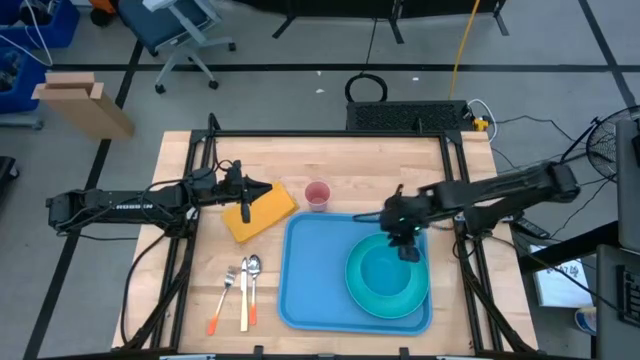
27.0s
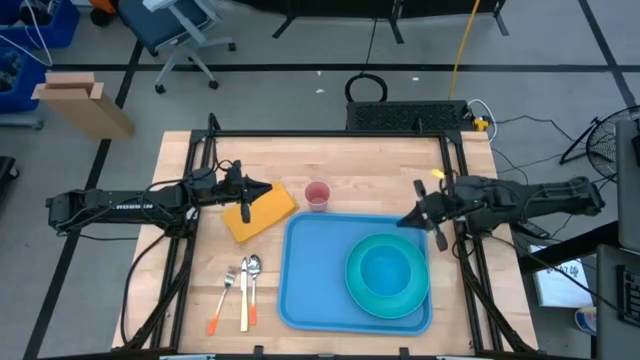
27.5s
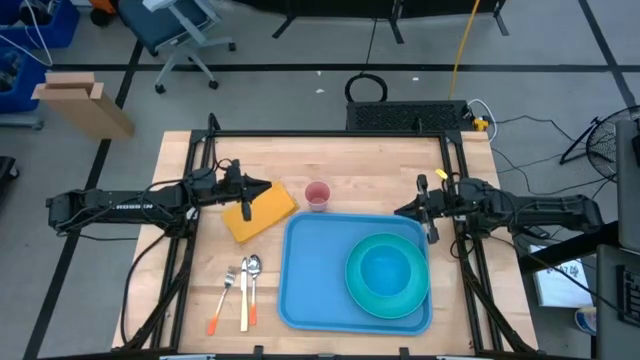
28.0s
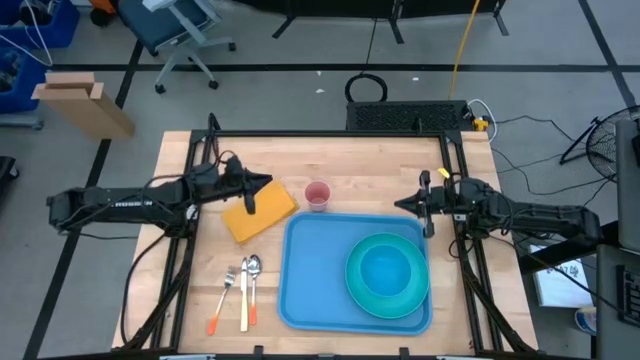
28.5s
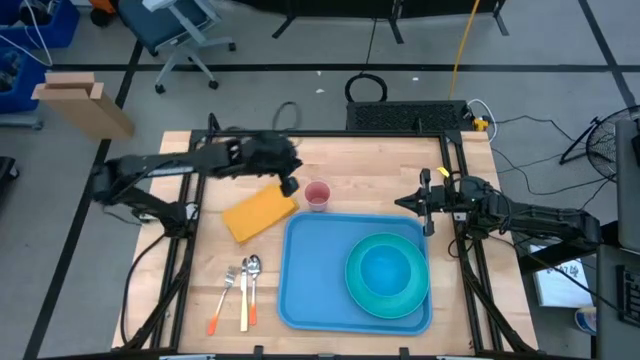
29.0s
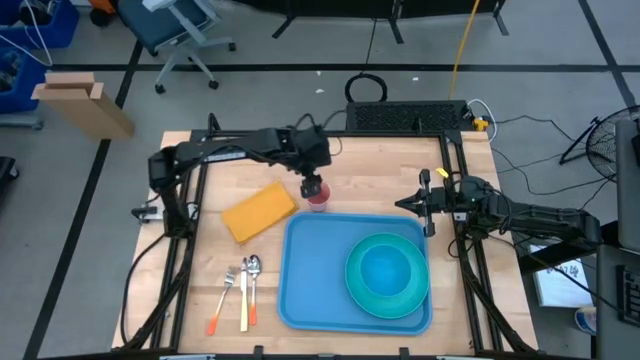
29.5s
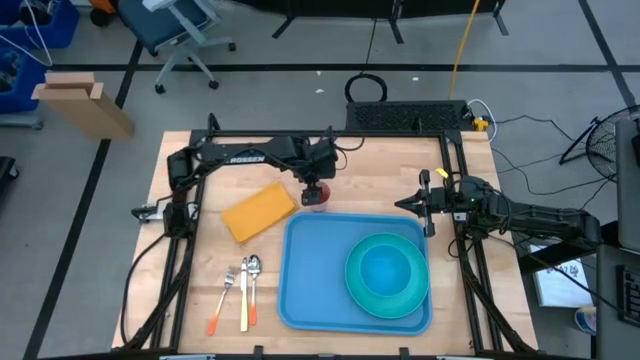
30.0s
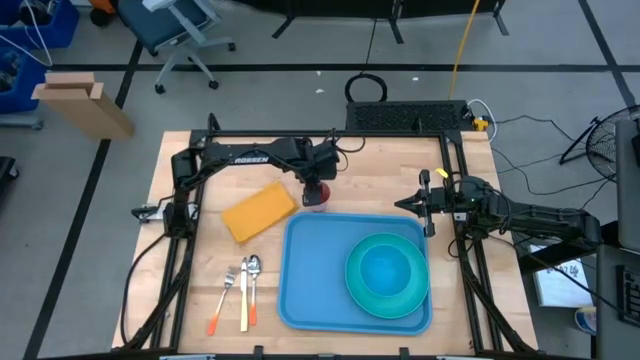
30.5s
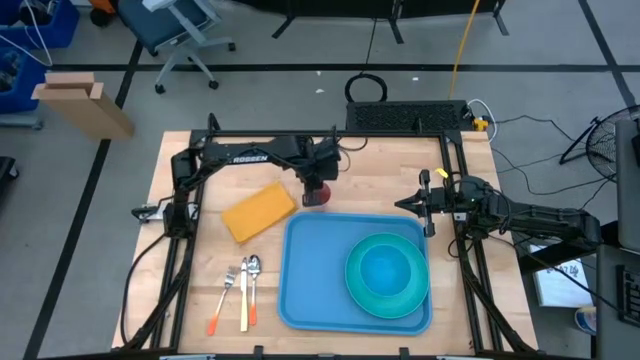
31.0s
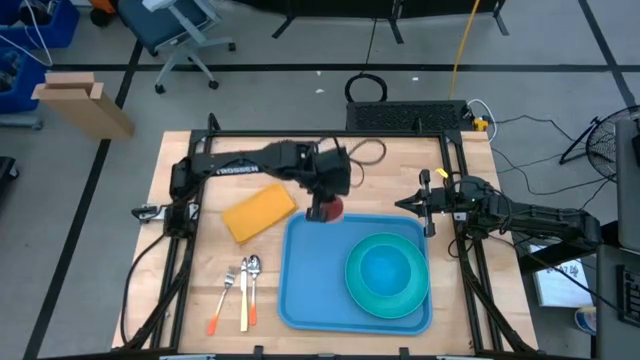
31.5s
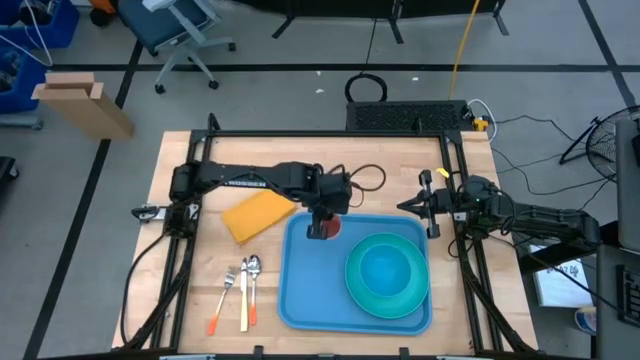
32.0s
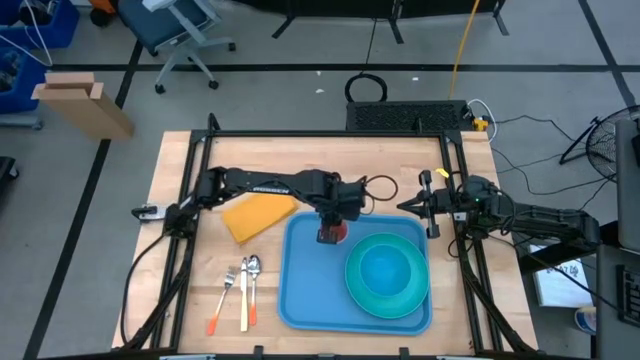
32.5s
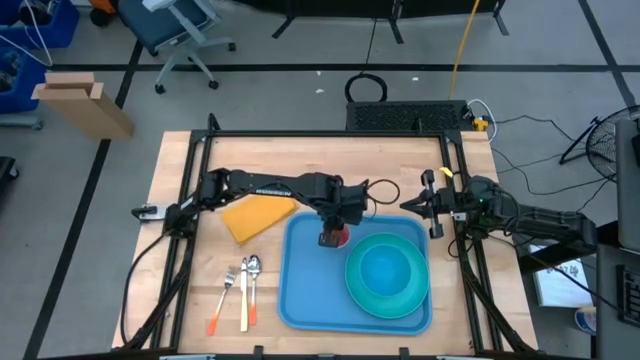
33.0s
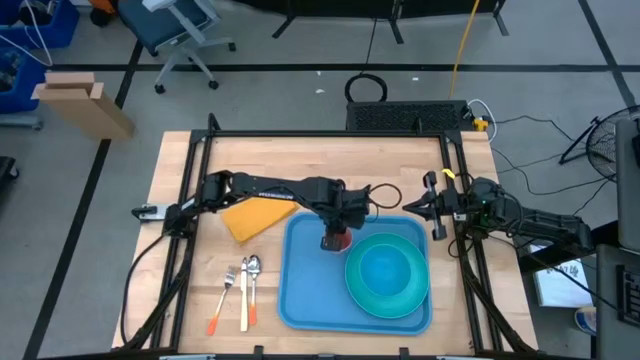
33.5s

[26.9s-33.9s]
Task: Set up tray
Put the pink plastic cup on the blue serving tray to the top left of the blue plate

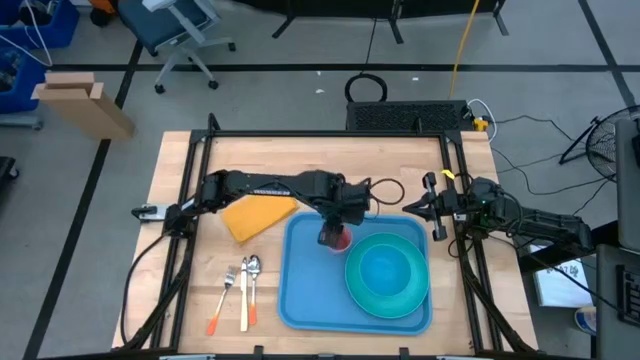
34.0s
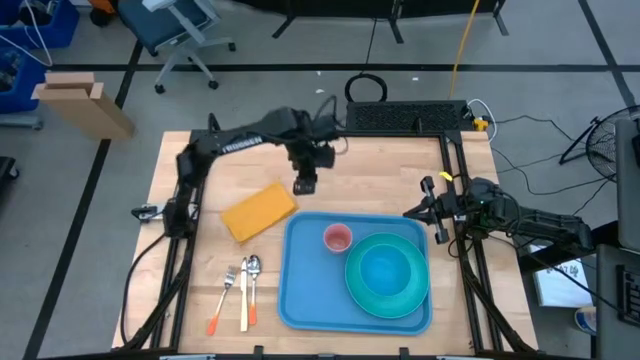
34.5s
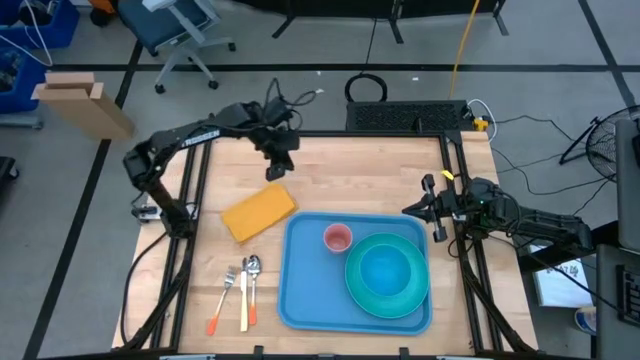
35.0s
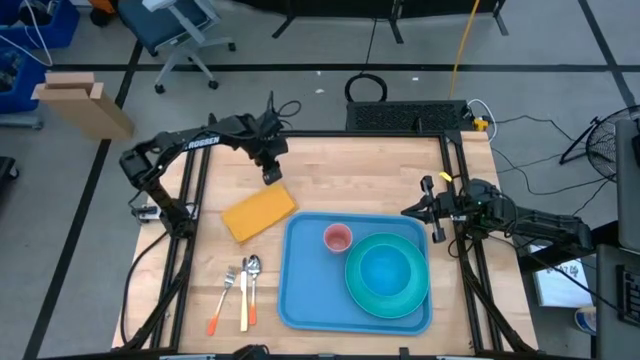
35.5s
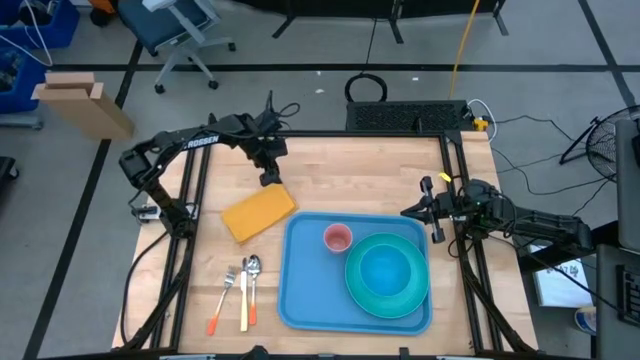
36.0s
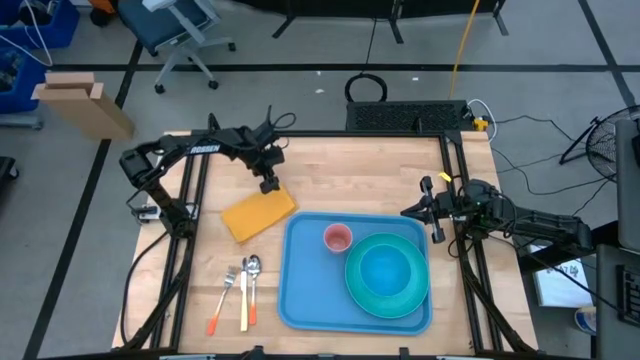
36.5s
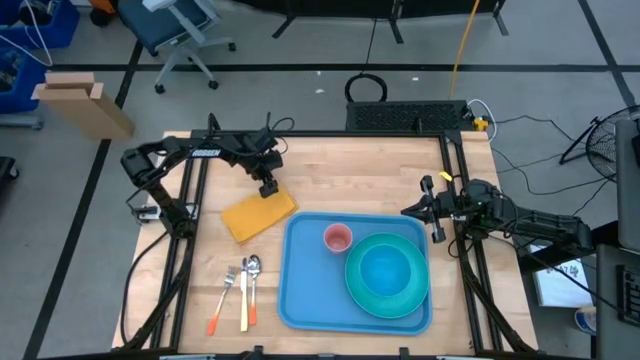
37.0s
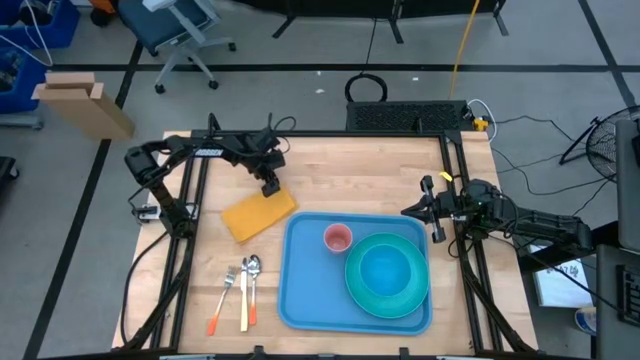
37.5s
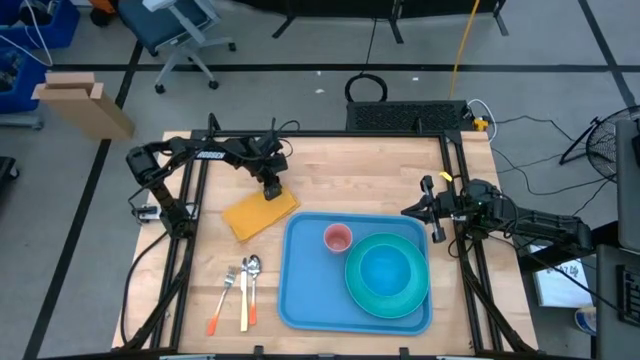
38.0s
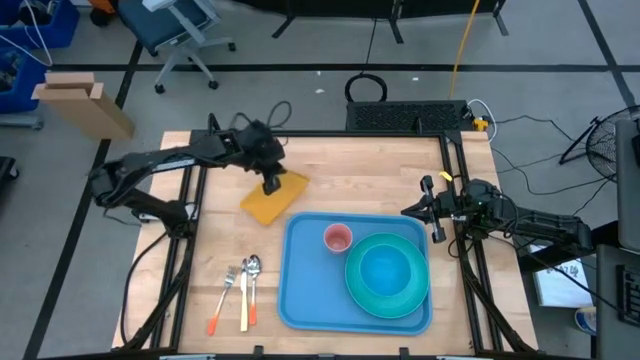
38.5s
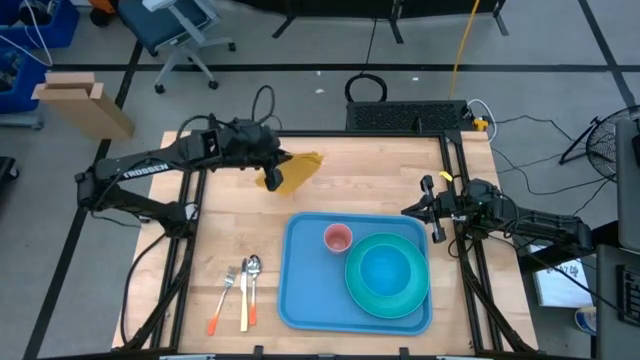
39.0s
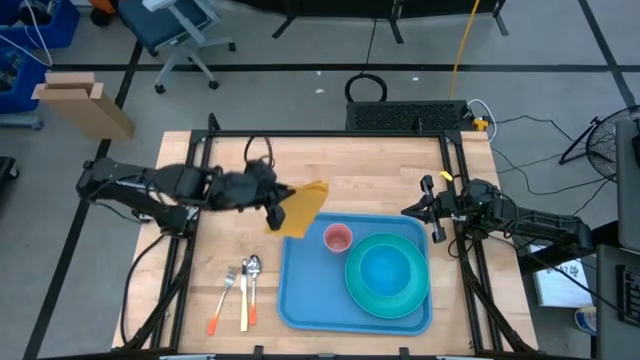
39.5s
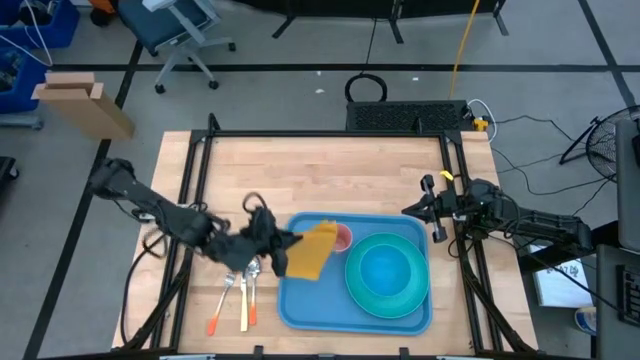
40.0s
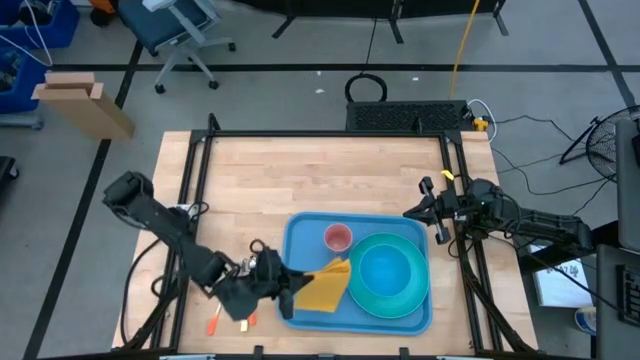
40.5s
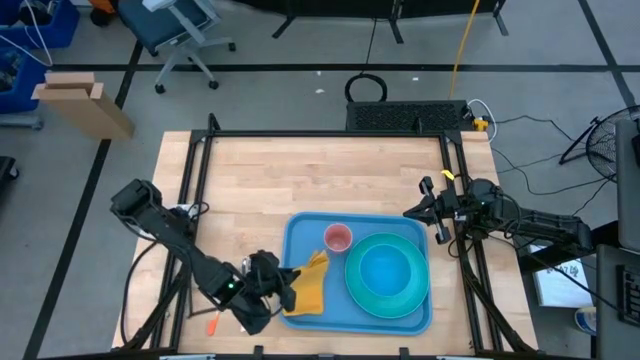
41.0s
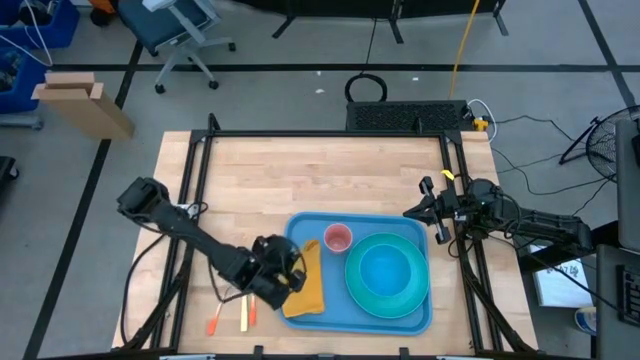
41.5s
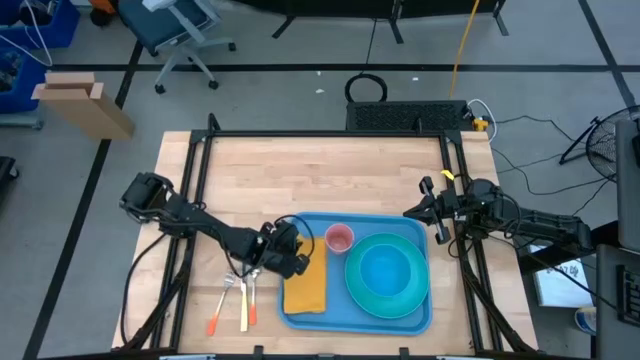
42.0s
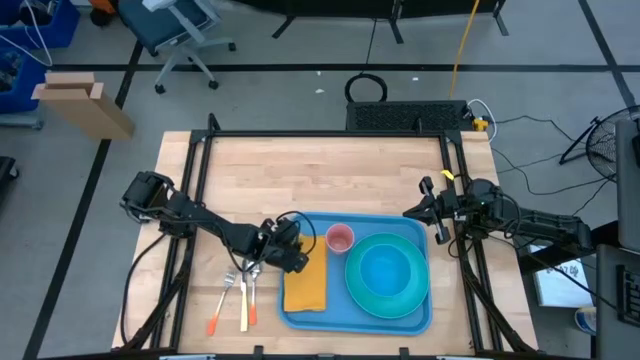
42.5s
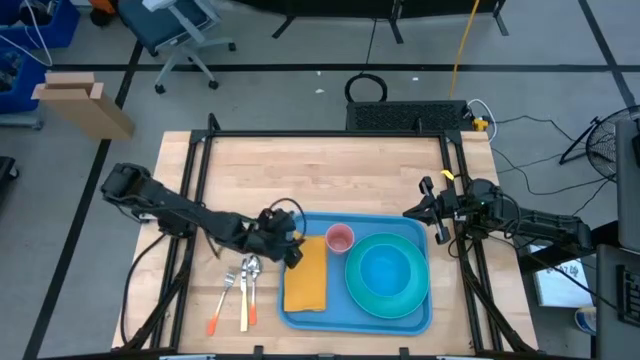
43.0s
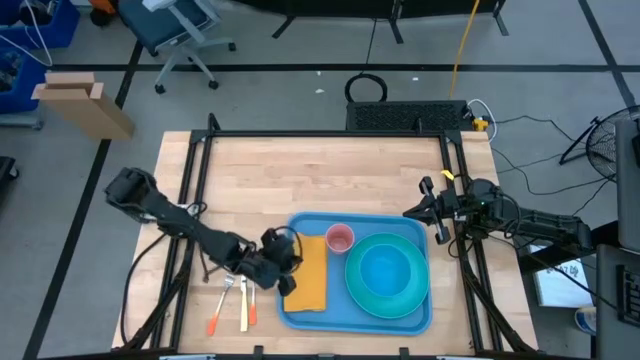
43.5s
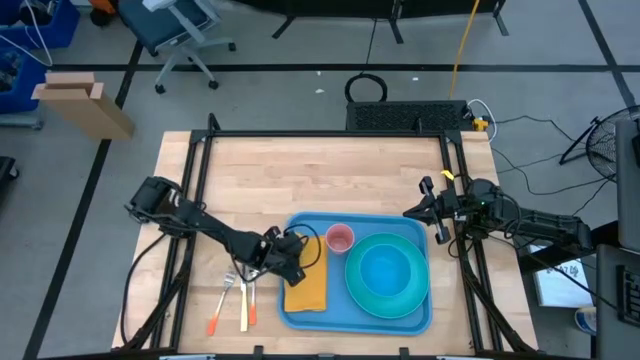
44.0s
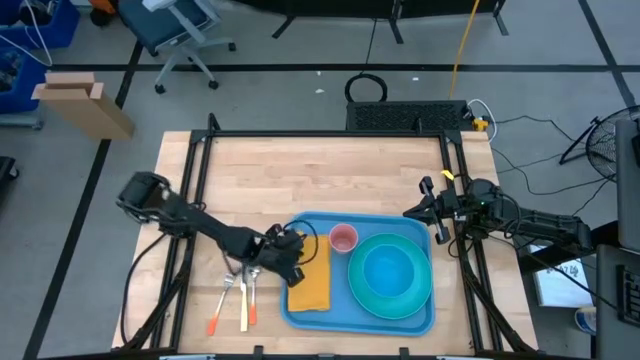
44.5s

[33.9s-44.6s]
Put the yellow table napkin on the blue serving tray to the bottom left of the pink plastic cup

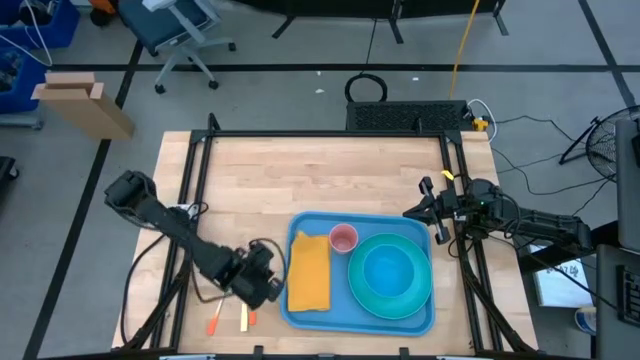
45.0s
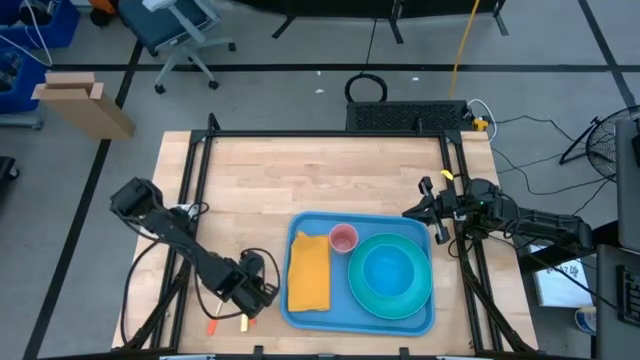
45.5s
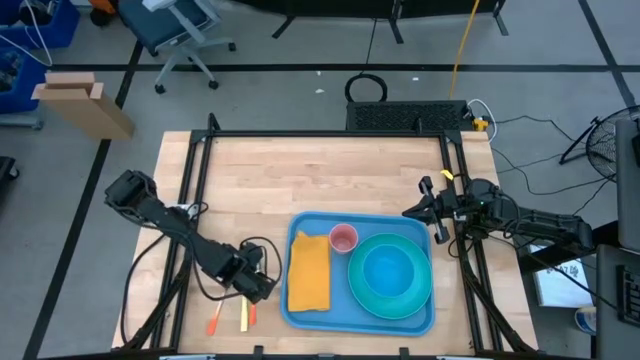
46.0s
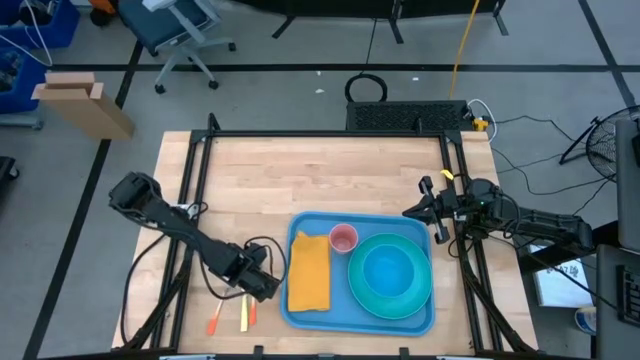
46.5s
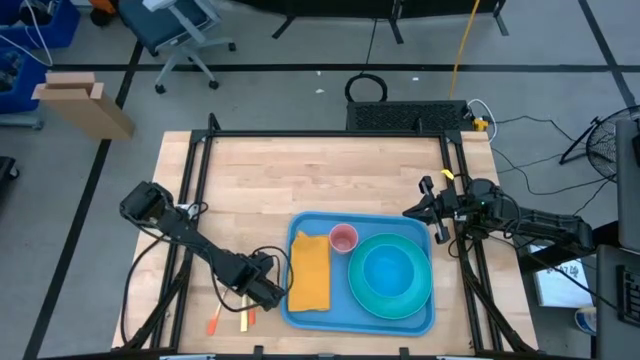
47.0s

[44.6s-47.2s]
Put the orange spoon on top of the yellow table napkin

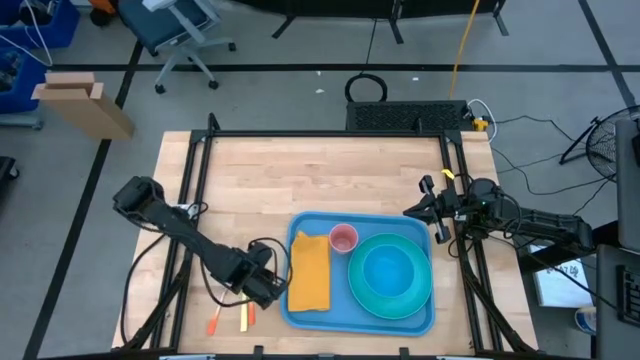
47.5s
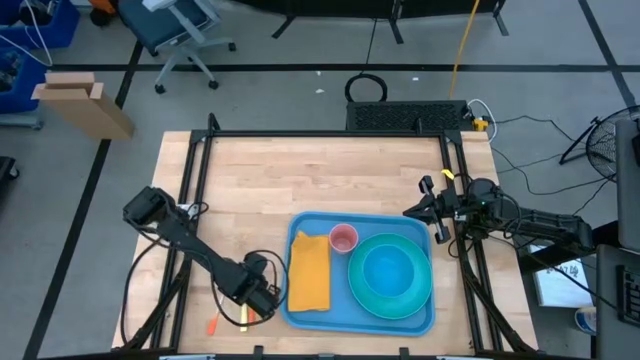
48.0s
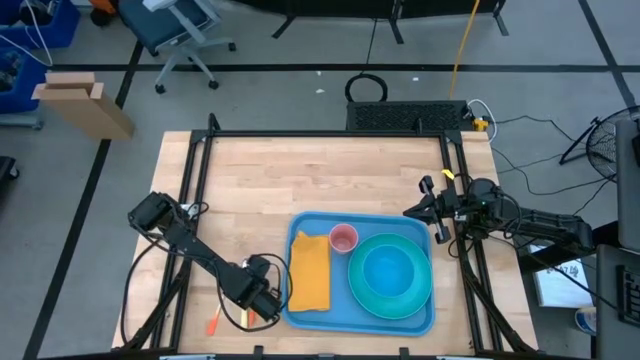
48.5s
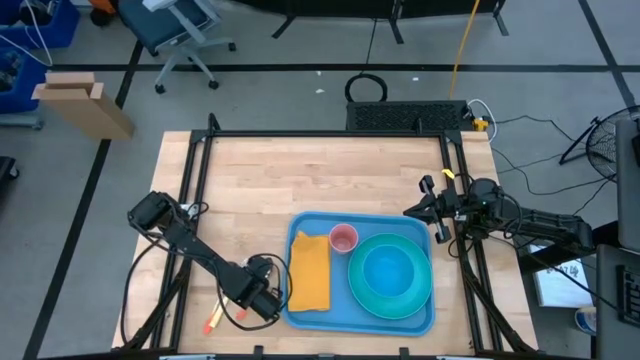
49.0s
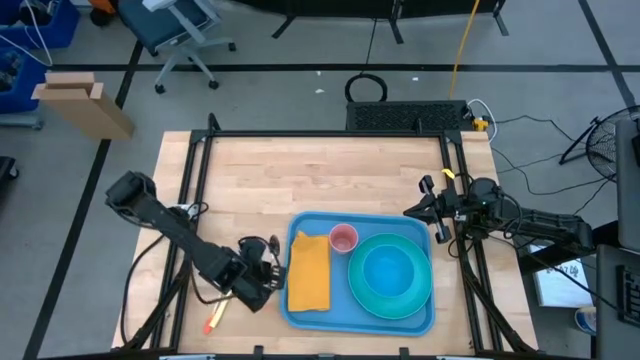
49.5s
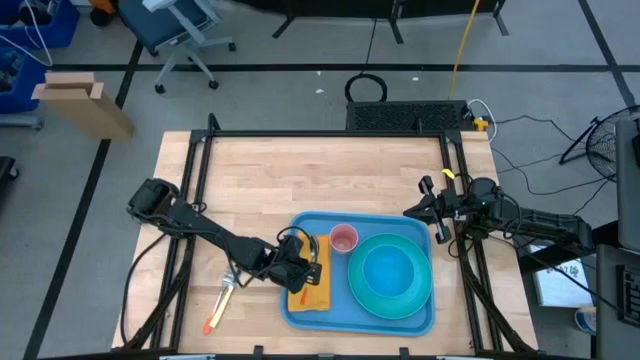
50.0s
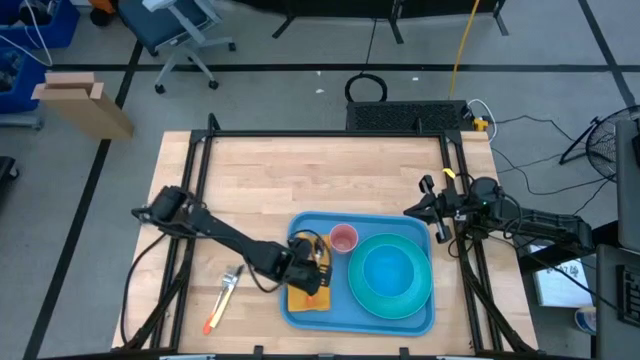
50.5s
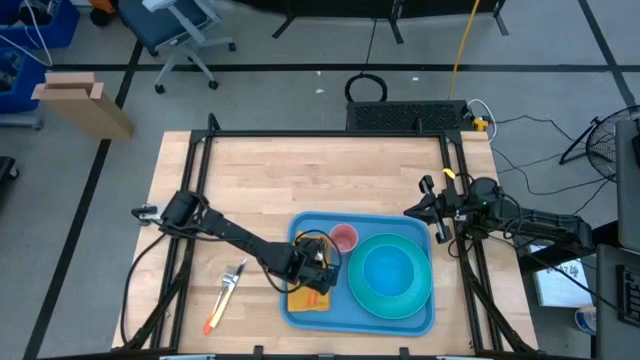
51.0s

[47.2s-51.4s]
Put the orange spoon on top of the yellow table napkin
